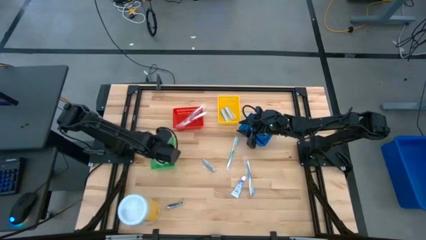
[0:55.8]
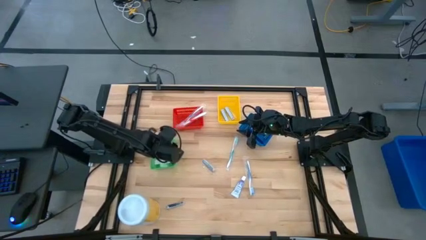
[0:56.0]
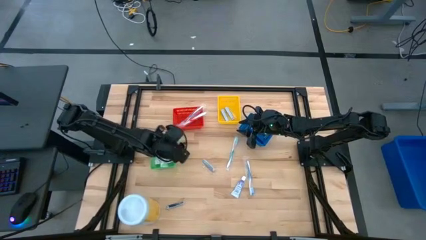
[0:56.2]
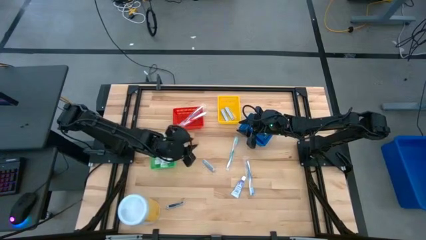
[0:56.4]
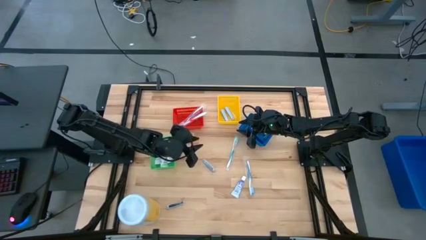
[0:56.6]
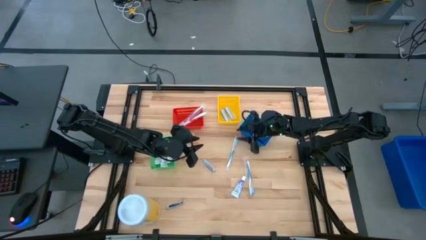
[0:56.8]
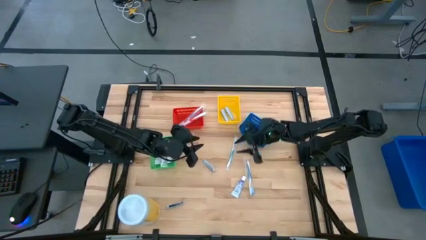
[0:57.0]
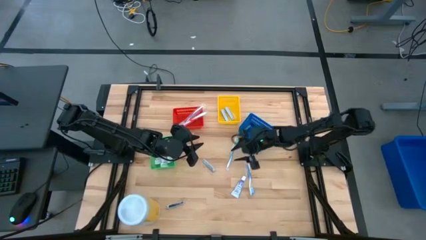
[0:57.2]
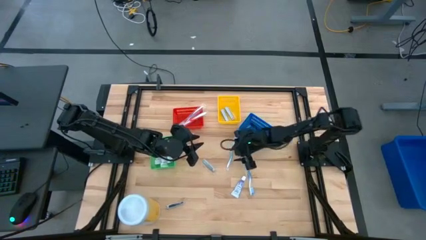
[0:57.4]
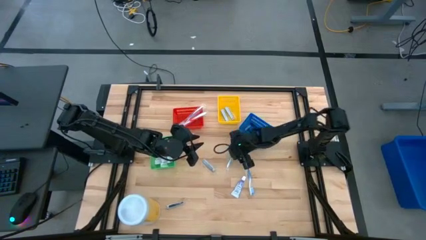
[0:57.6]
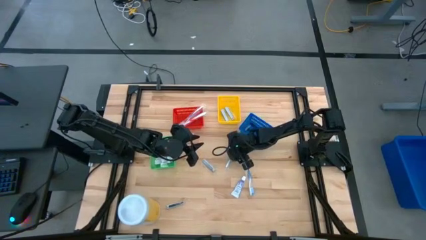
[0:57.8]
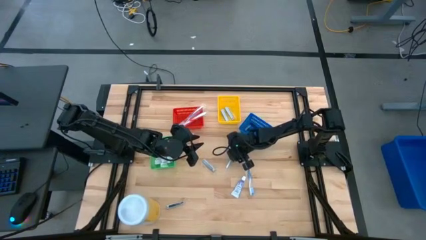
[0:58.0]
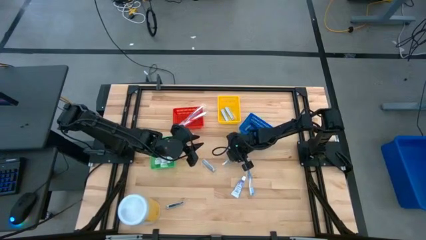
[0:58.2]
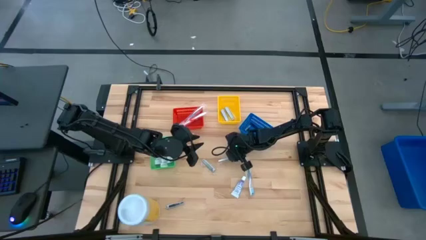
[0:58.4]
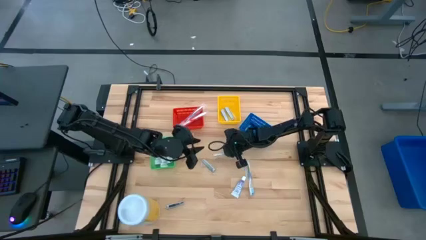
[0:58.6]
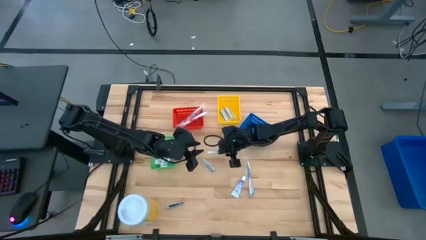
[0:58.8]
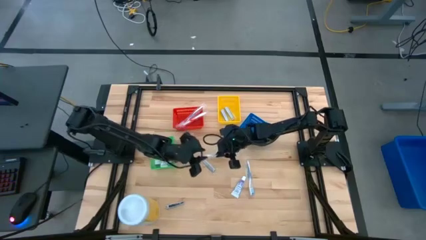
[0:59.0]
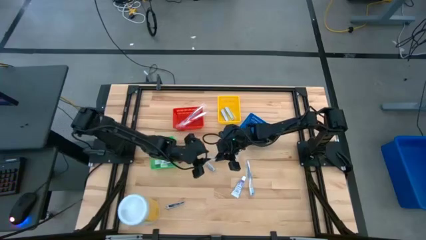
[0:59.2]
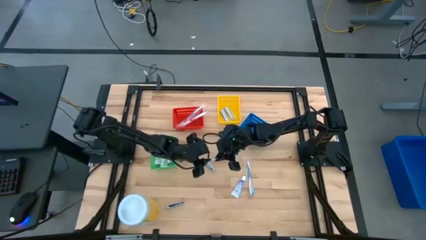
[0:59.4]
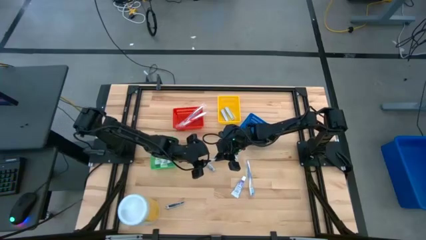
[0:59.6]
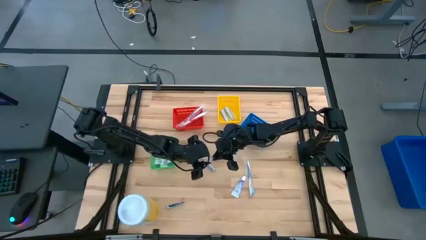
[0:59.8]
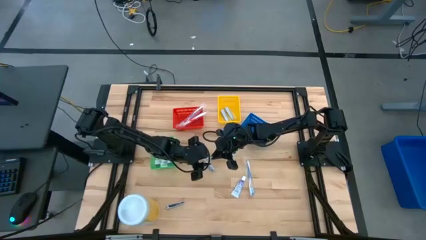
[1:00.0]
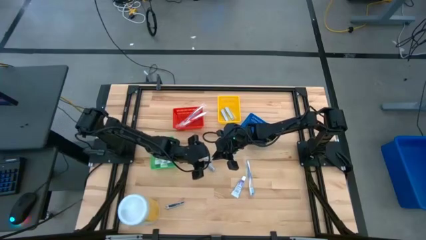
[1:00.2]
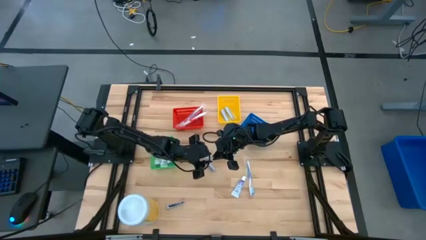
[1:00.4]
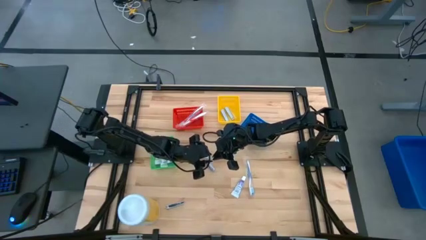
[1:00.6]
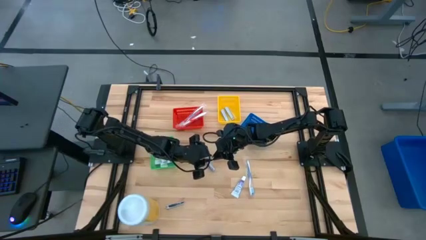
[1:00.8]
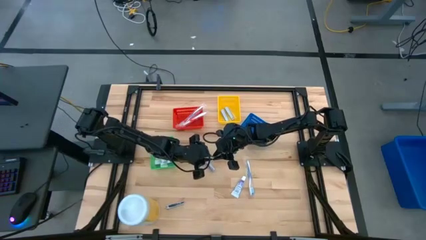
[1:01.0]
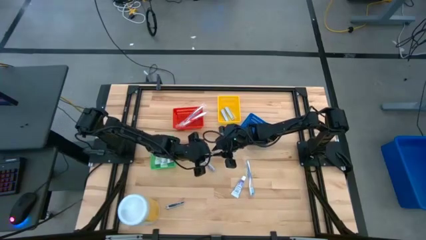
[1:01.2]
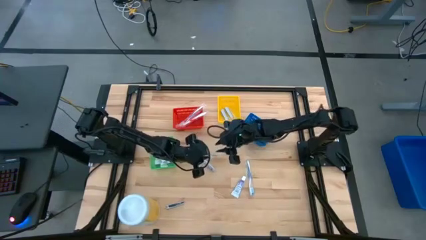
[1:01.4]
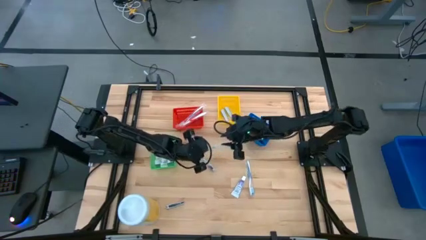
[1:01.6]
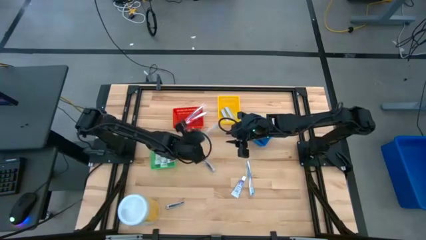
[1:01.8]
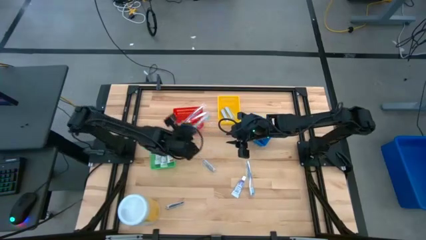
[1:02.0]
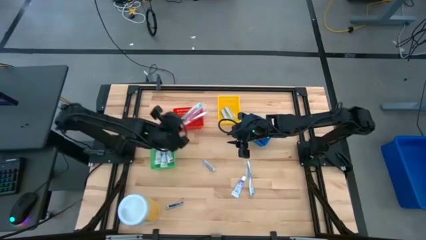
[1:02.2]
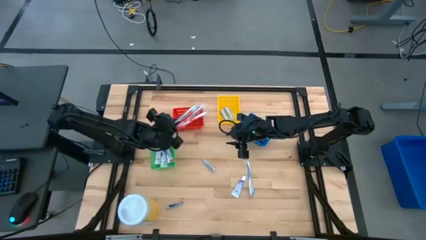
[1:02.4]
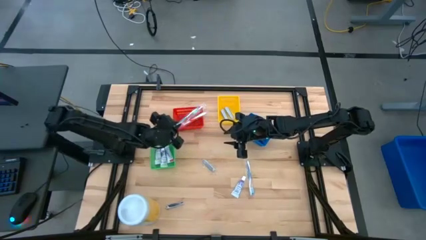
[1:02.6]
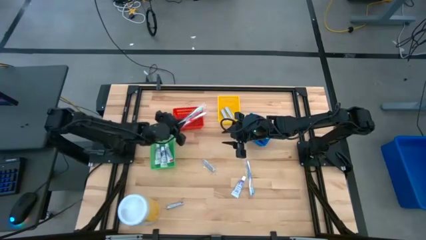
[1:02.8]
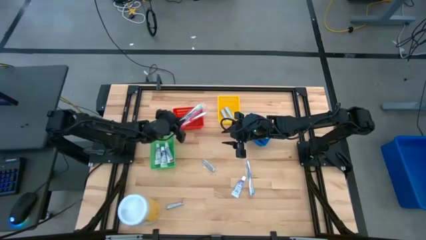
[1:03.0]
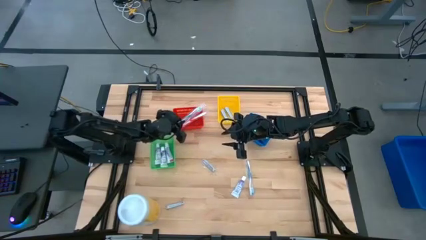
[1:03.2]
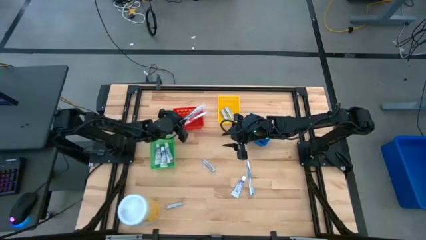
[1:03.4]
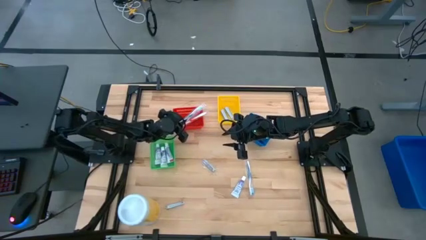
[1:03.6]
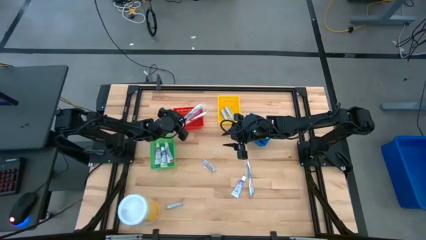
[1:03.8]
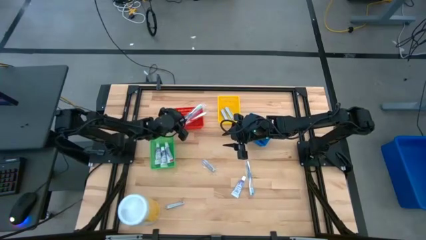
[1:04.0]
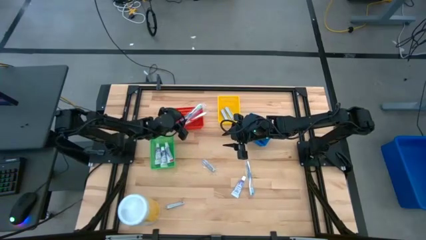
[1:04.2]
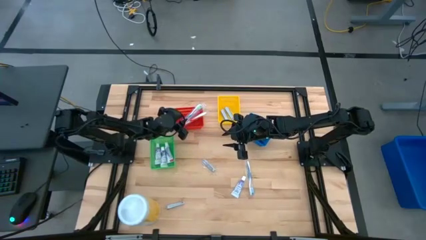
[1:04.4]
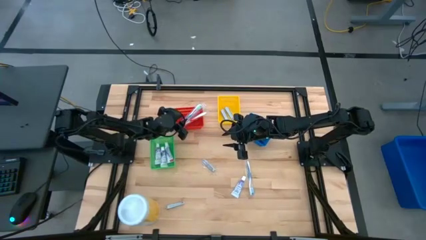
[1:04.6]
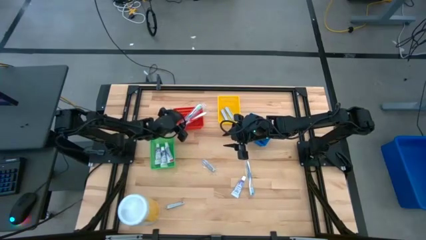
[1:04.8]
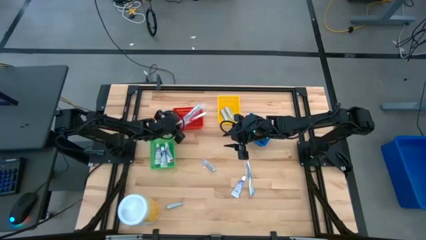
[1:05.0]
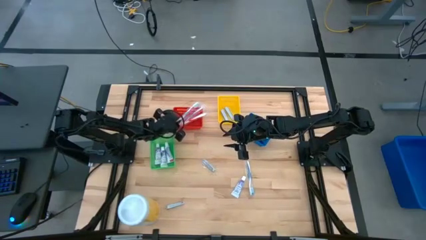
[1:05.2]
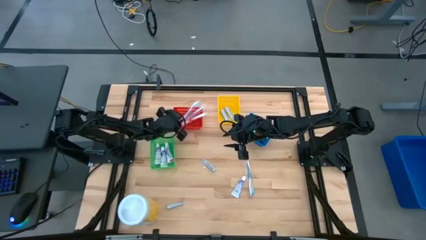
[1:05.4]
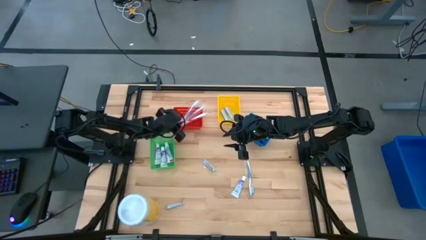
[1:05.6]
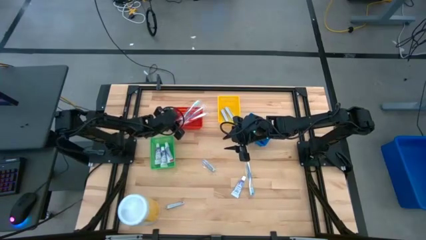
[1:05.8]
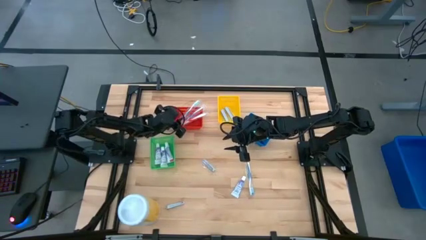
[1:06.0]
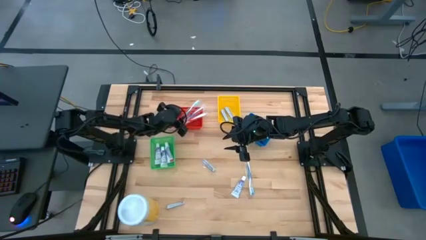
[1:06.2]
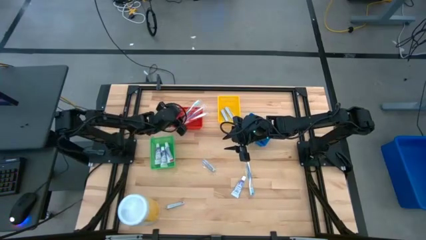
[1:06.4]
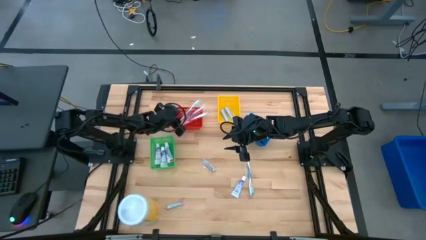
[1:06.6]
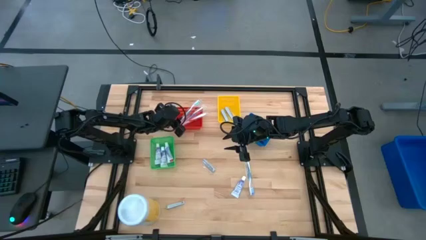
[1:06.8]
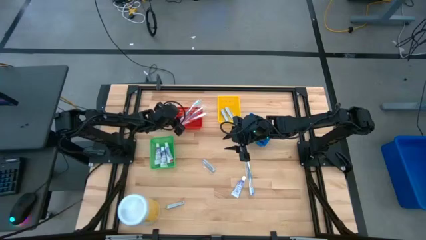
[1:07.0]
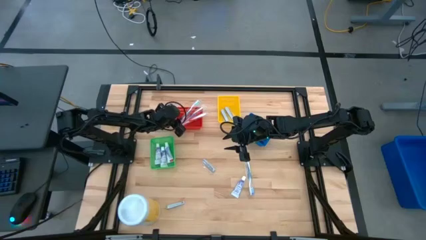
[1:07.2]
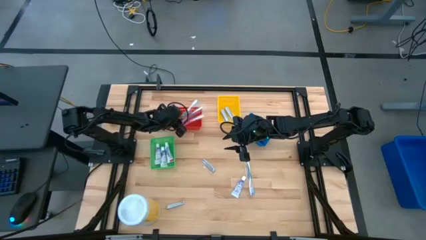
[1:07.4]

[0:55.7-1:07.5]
Task: Pick & Place Travel size toiletries
Put the green toothbrush into the red bin
